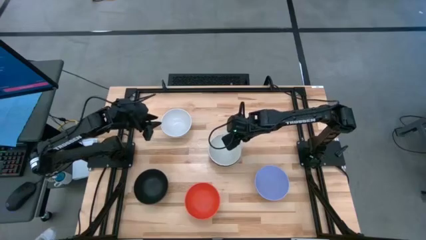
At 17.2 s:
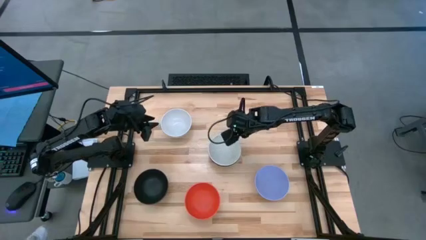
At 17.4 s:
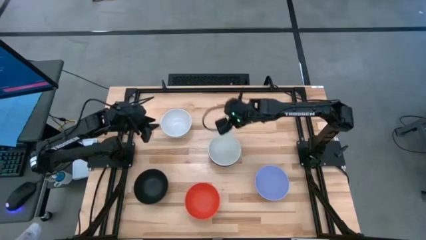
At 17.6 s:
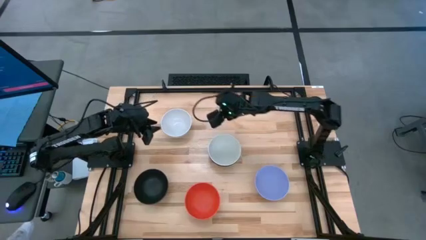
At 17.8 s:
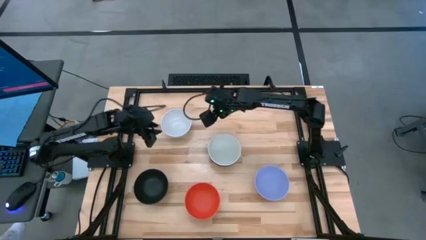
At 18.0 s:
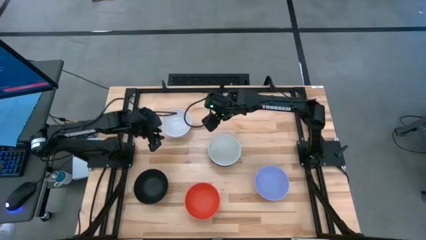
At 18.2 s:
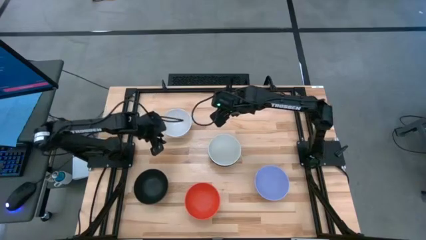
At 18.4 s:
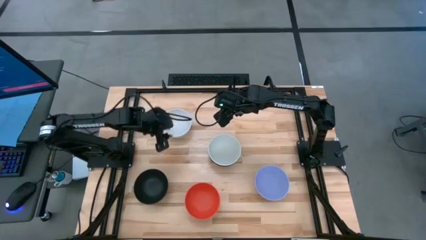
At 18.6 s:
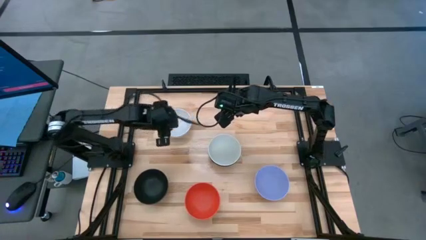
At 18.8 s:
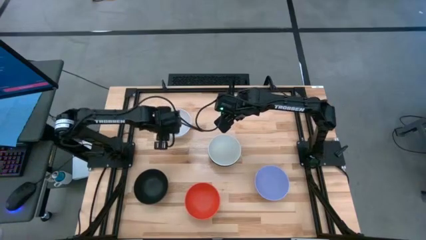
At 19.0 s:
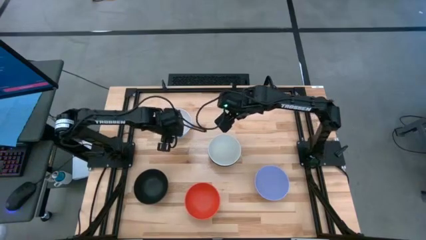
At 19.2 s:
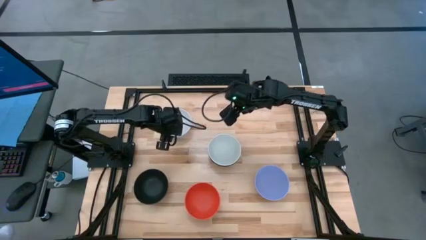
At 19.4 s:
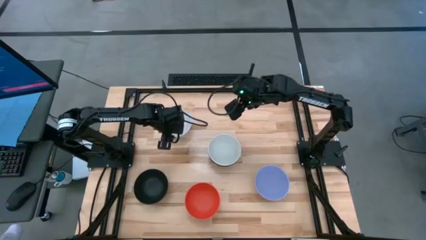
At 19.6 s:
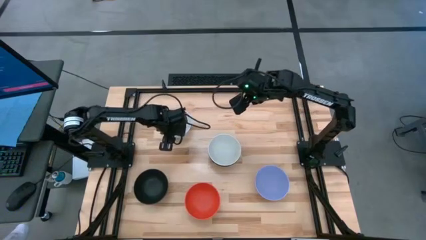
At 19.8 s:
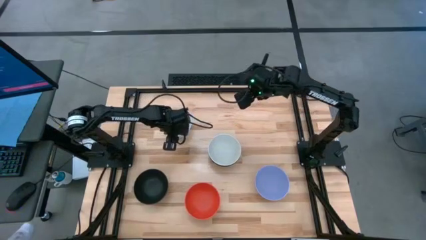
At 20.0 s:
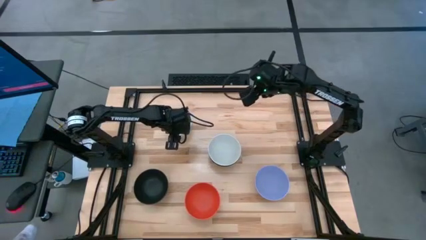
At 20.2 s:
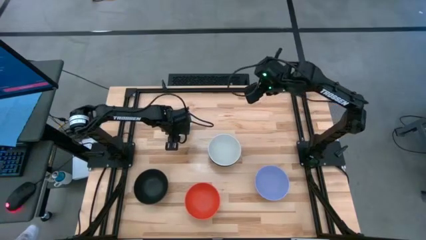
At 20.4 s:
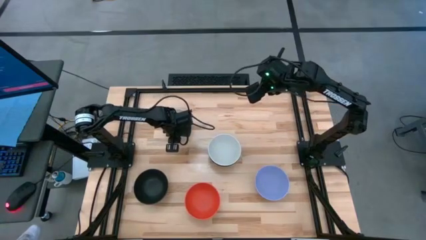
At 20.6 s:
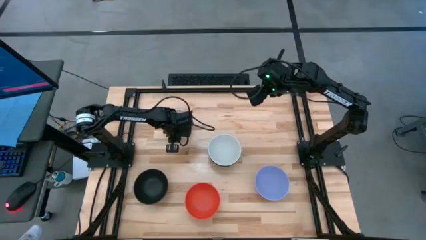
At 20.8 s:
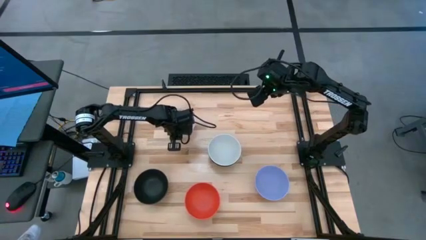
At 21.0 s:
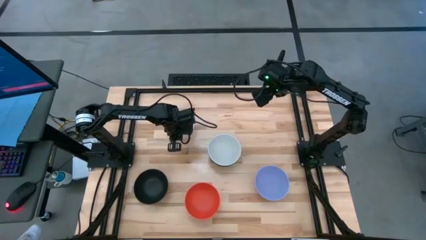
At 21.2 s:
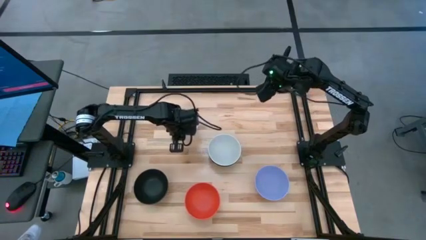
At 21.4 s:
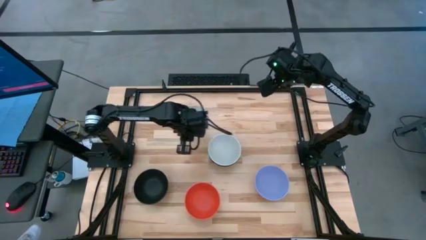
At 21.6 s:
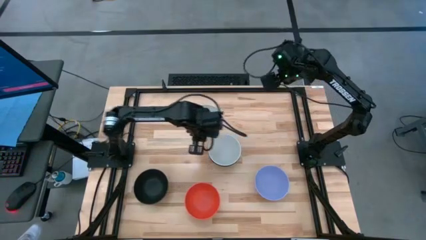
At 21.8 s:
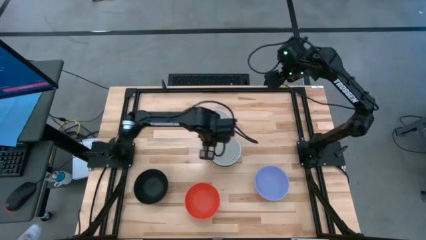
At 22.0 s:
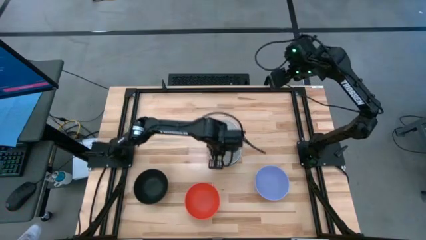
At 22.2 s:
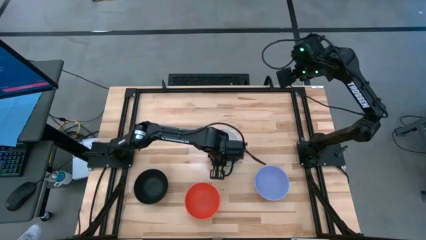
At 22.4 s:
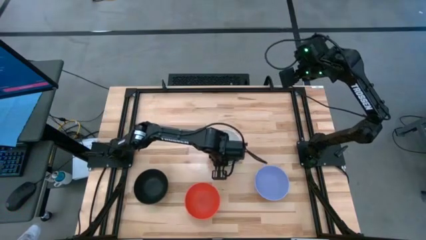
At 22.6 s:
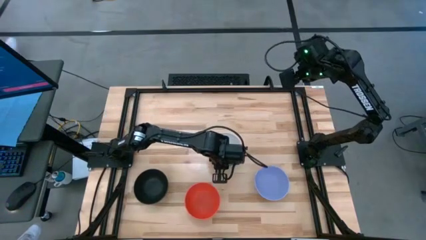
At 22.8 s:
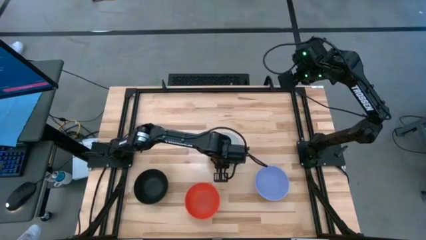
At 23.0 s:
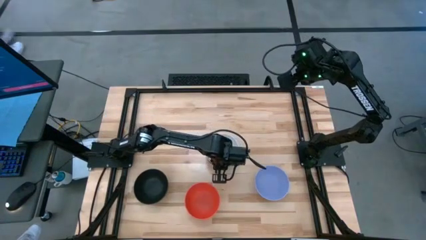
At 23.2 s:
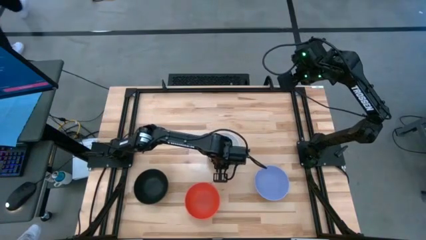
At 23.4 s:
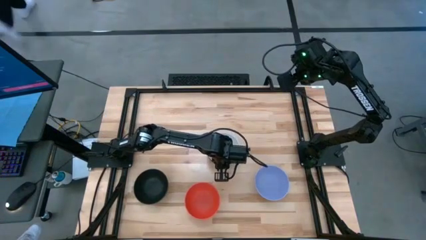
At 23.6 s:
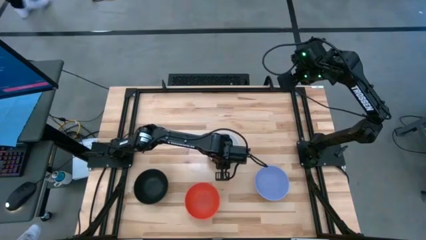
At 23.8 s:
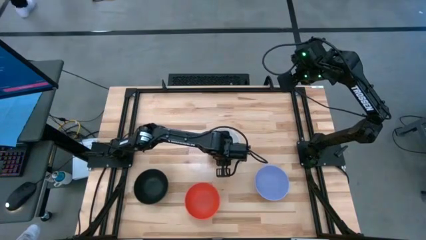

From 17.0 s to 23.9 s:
Task: Nest bowls inside each other
Stack the white bowl on top of the white bowl

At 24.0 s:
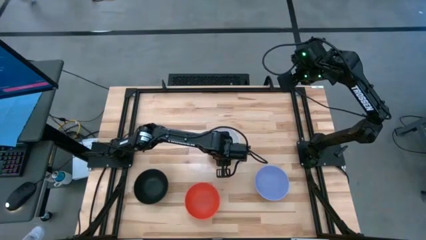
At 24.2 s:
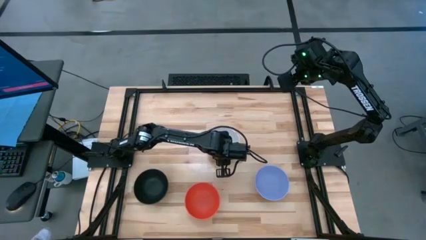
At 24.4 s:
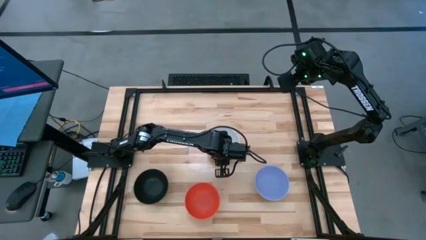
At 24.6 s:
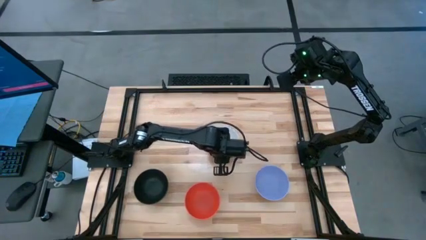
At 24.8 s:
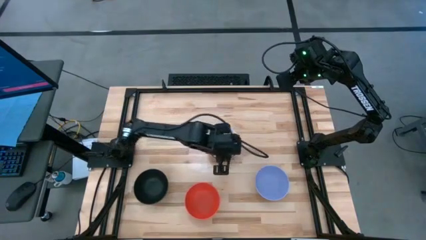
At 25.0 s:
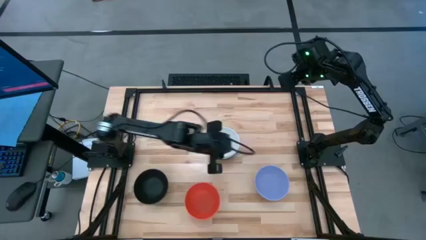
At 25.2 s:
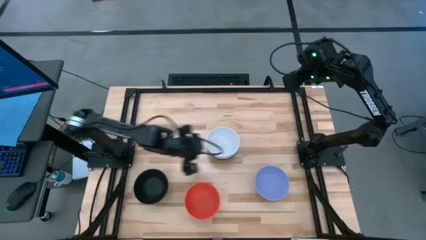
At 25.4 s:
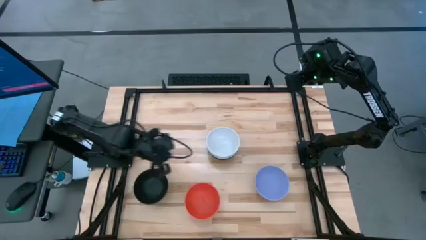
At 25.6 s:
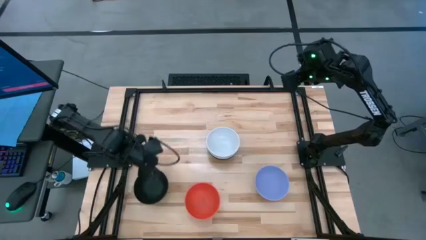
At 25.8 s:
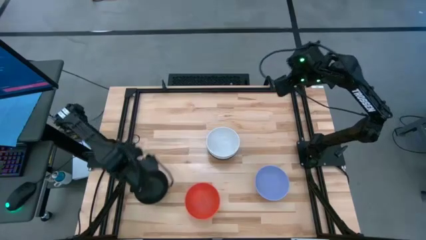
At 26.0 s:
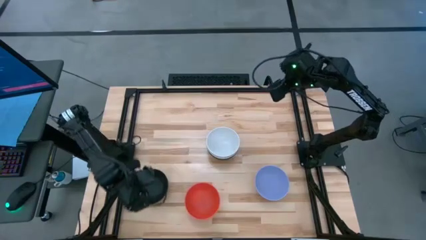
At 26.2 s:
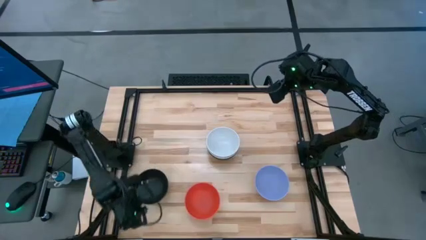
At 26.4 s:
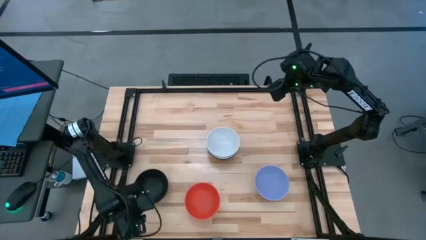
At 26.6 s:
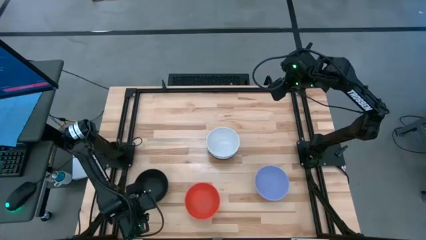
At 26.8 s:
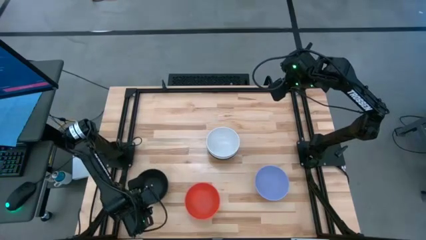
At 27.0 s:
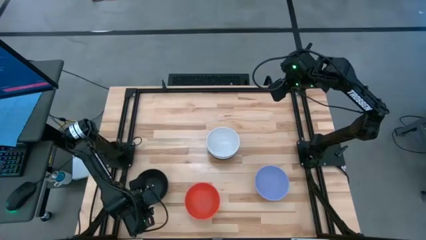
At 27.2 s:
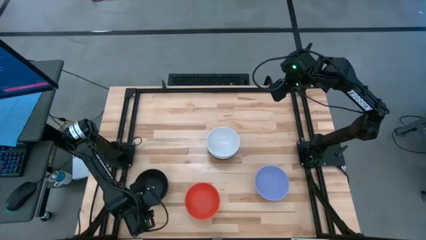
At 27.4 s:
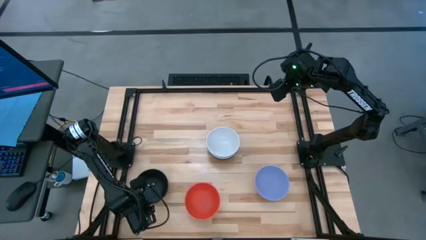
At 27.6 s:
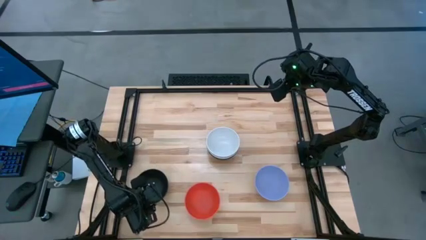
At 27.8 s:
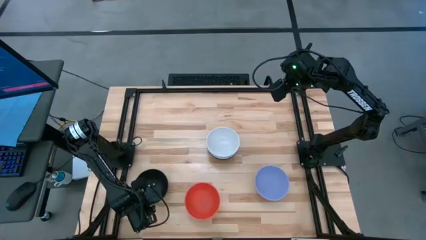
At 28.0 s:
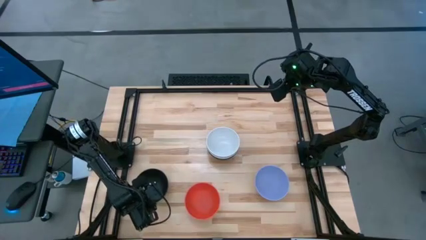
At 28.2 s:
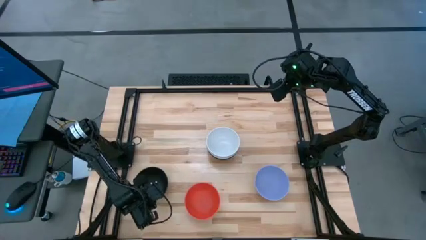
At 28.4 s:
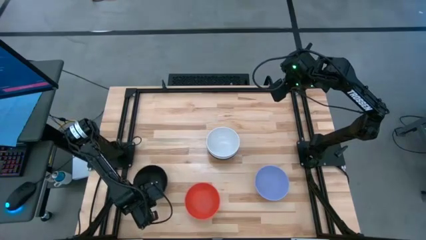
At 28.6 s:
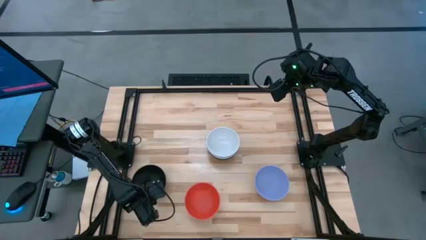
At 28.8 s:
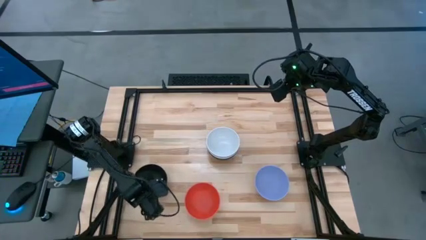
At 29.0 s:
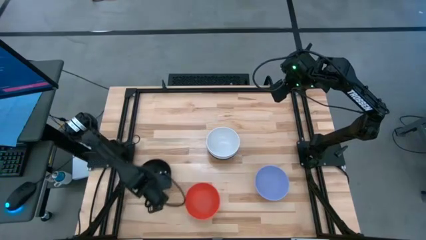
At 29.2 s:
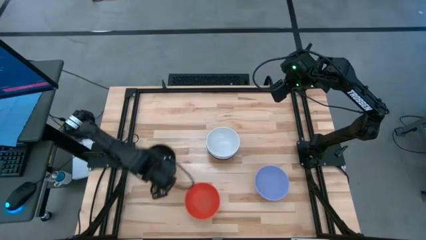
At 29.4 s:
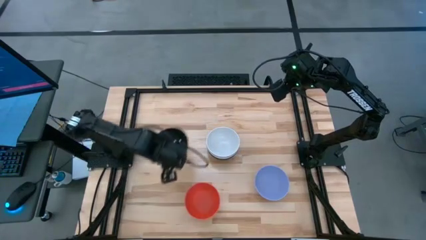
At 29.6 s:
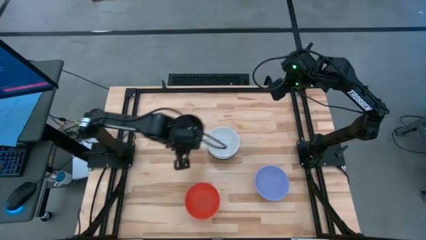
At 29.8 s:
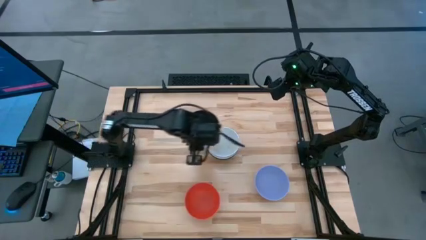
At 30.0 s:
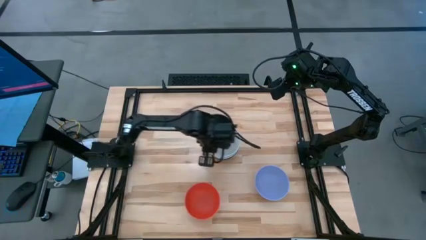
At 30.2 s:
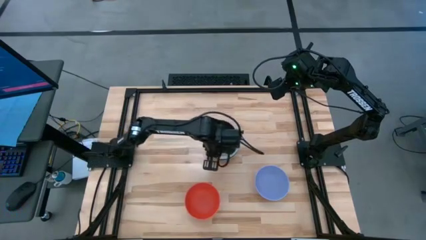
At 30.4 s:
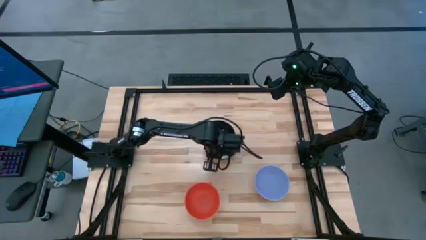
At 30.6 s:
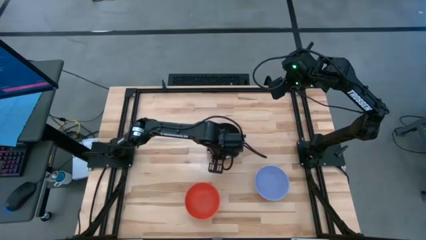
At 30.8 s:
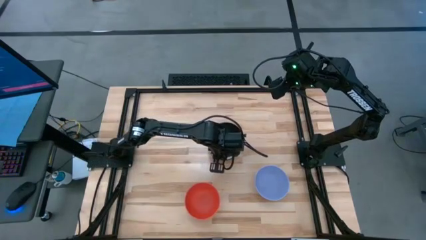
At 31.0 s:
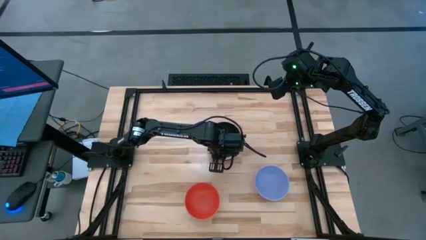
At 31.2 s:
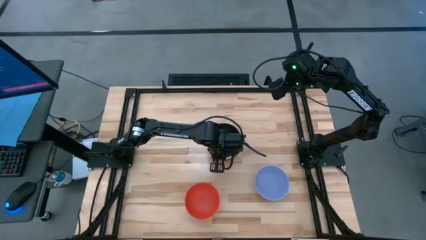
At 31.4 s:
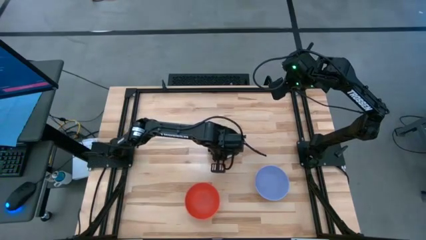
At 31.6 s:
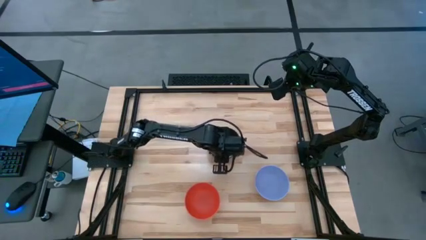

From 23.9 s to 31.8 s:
Stack the black bowl on top of the white bowl
